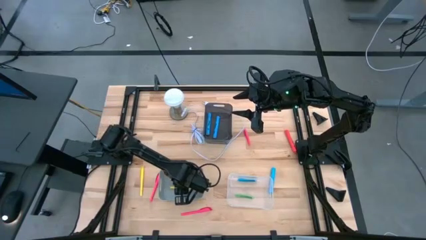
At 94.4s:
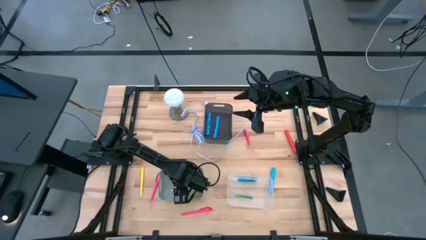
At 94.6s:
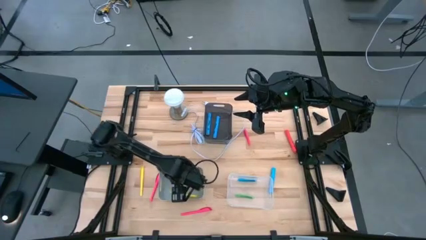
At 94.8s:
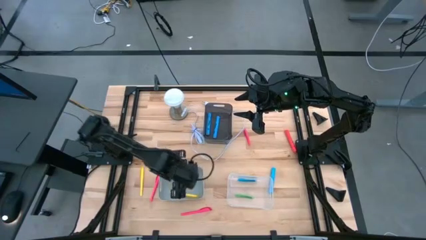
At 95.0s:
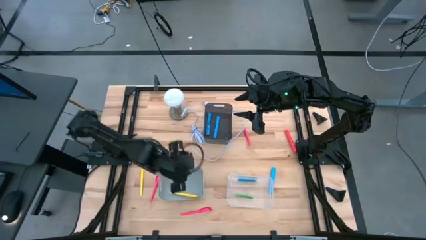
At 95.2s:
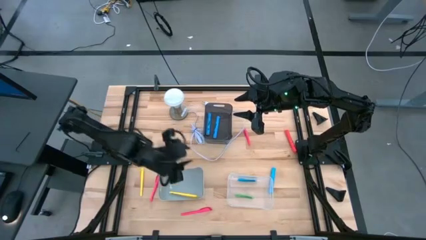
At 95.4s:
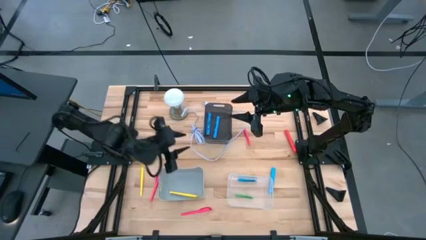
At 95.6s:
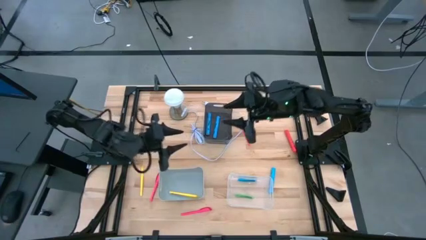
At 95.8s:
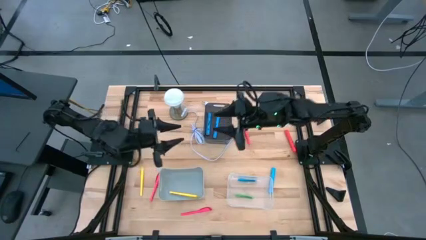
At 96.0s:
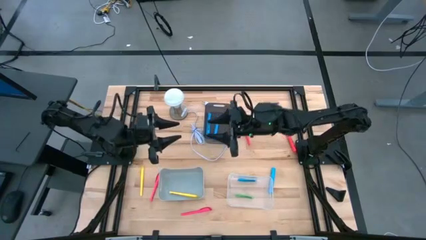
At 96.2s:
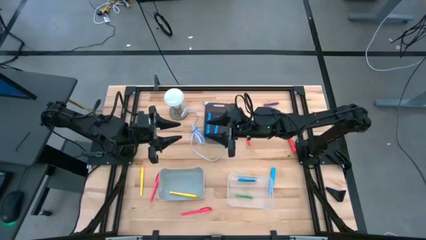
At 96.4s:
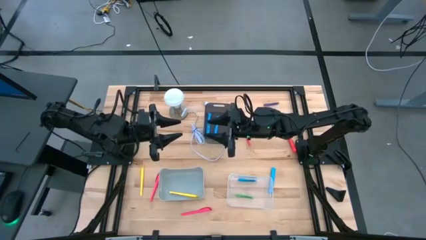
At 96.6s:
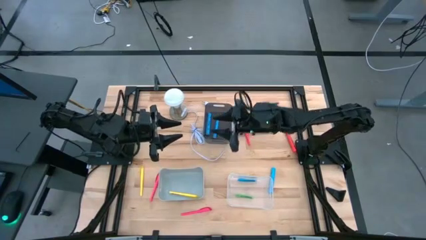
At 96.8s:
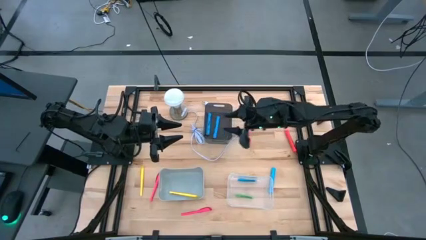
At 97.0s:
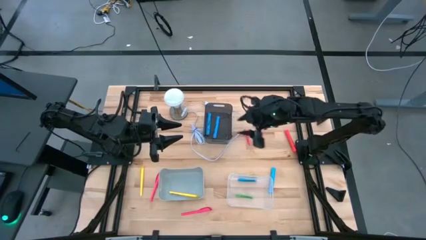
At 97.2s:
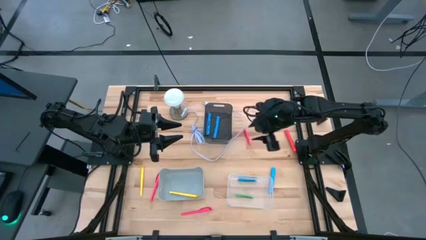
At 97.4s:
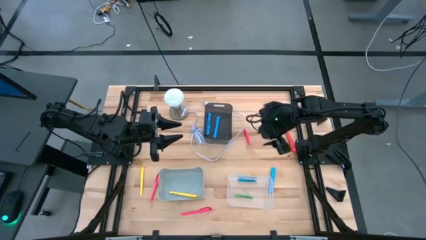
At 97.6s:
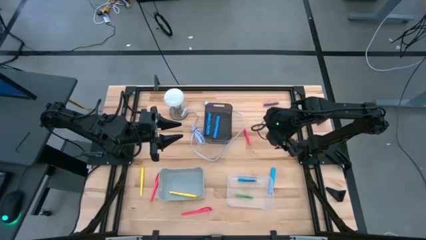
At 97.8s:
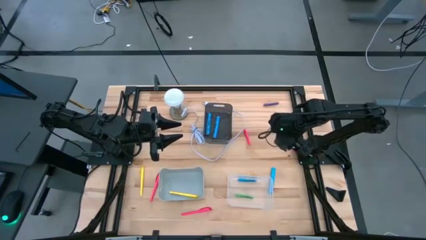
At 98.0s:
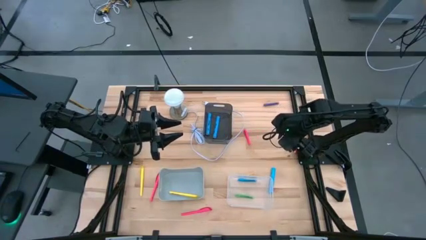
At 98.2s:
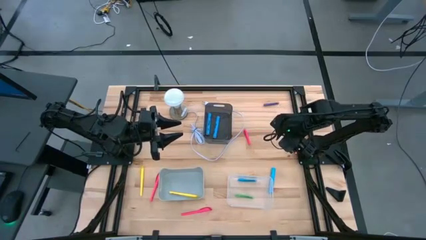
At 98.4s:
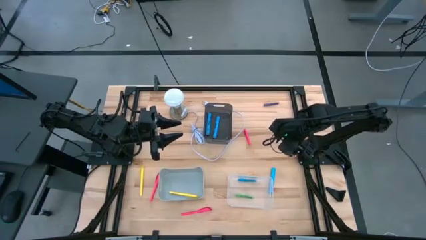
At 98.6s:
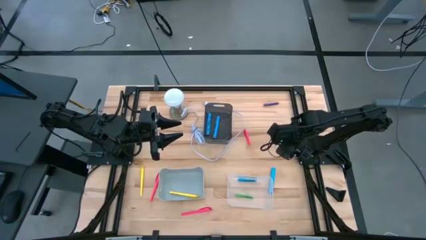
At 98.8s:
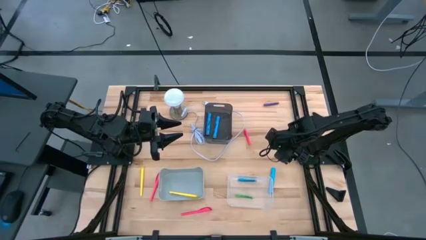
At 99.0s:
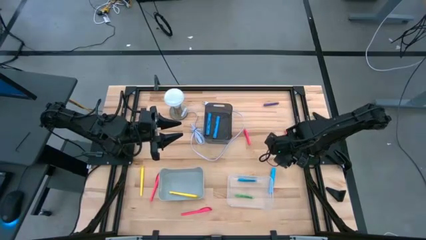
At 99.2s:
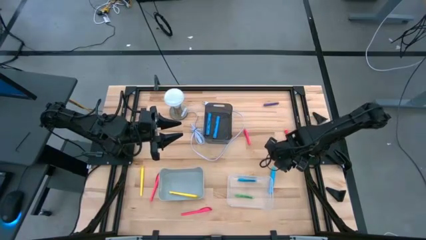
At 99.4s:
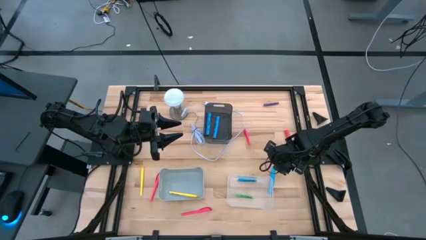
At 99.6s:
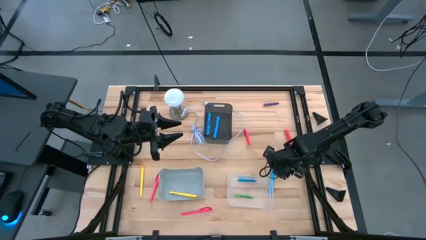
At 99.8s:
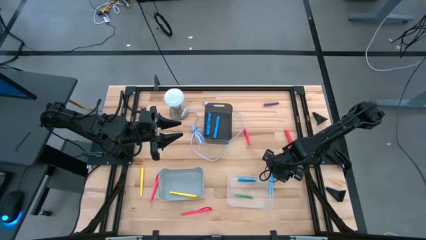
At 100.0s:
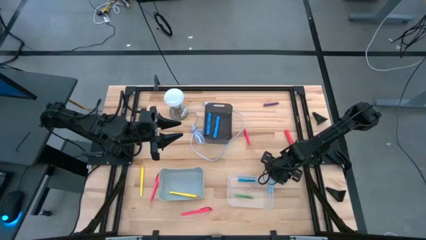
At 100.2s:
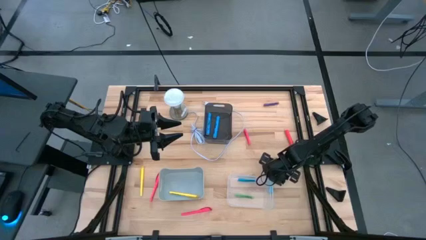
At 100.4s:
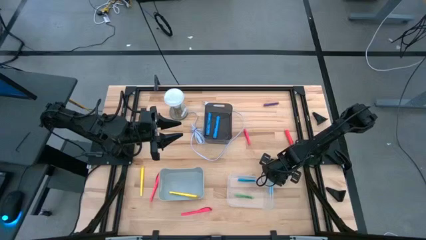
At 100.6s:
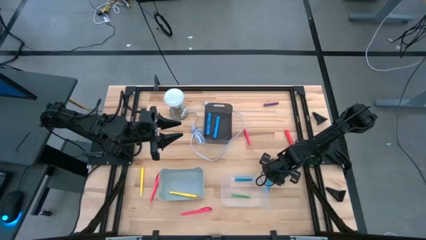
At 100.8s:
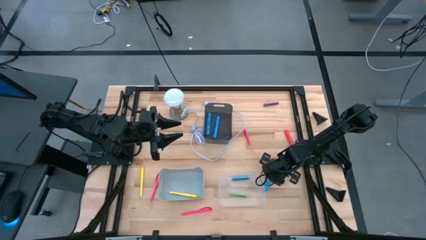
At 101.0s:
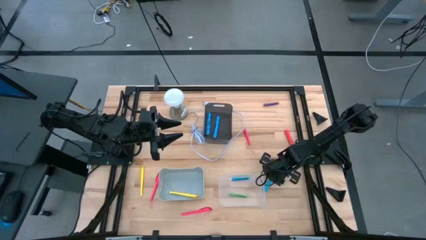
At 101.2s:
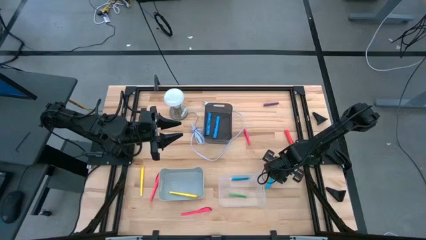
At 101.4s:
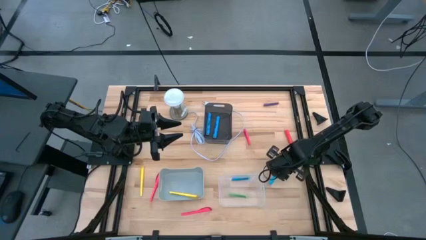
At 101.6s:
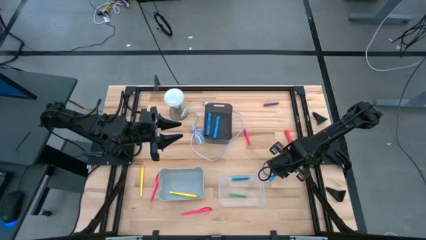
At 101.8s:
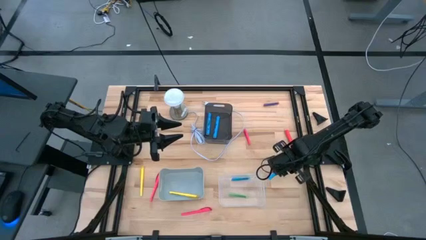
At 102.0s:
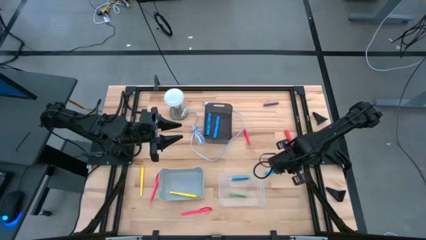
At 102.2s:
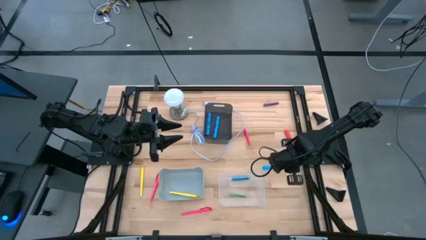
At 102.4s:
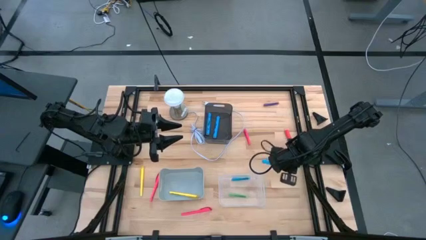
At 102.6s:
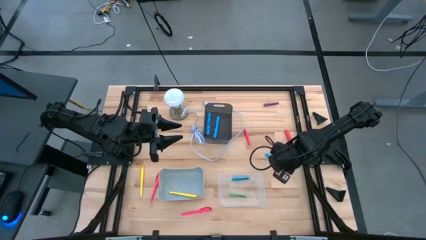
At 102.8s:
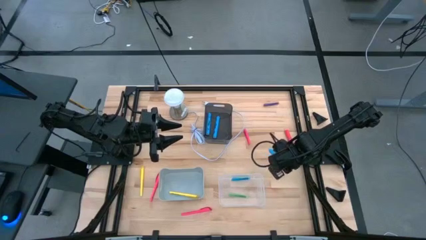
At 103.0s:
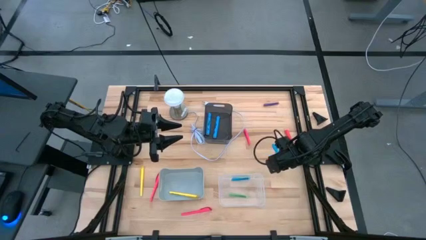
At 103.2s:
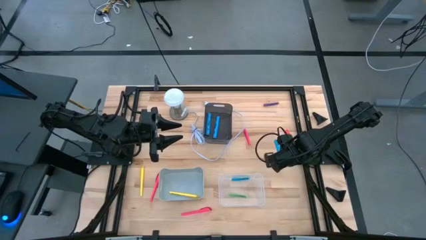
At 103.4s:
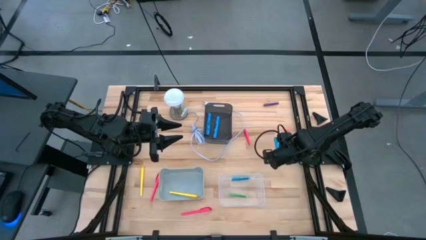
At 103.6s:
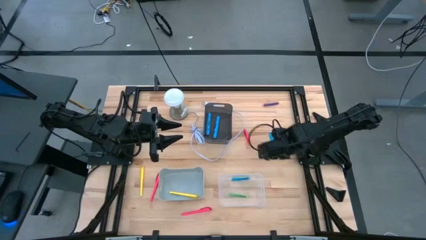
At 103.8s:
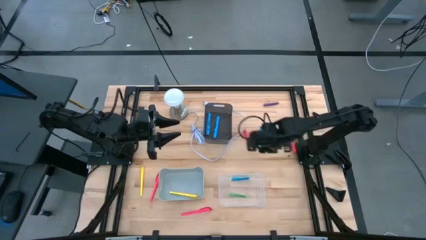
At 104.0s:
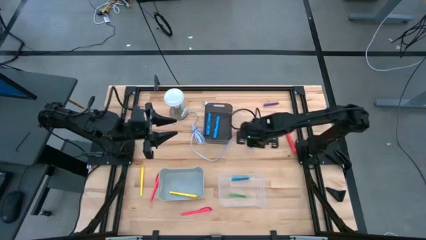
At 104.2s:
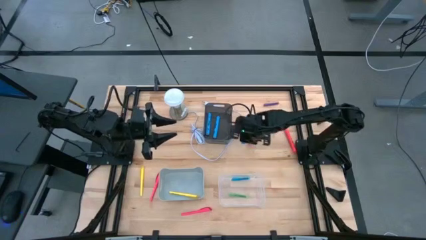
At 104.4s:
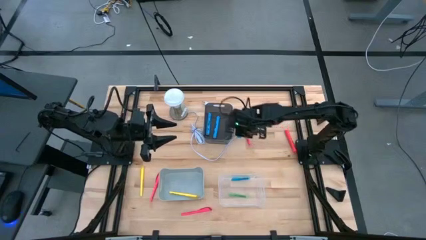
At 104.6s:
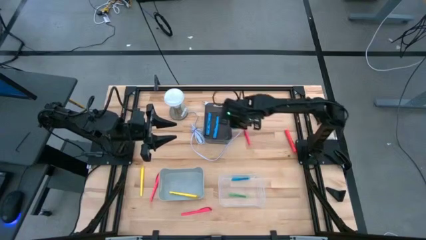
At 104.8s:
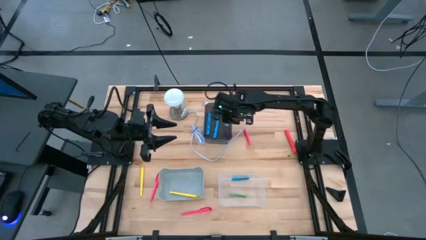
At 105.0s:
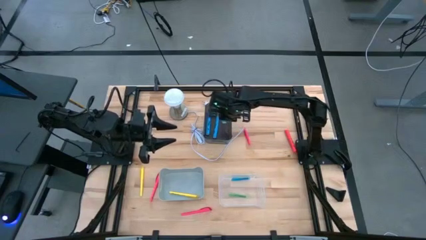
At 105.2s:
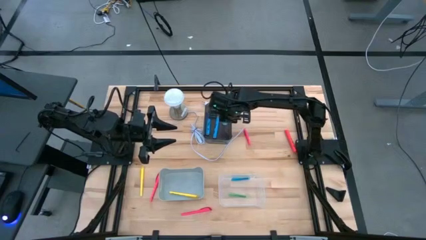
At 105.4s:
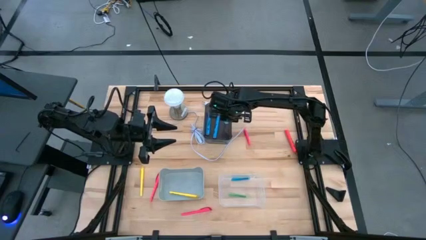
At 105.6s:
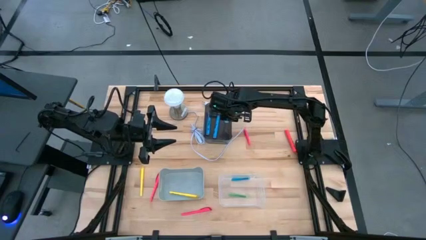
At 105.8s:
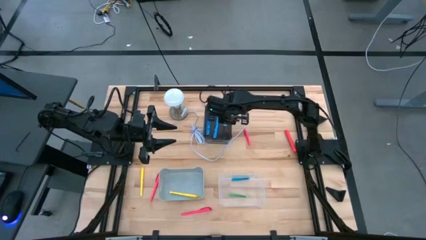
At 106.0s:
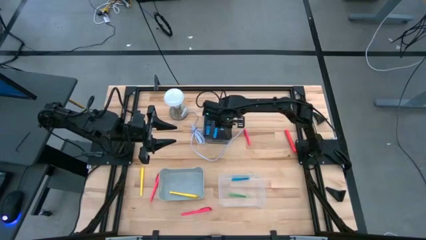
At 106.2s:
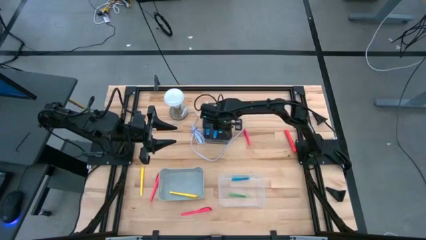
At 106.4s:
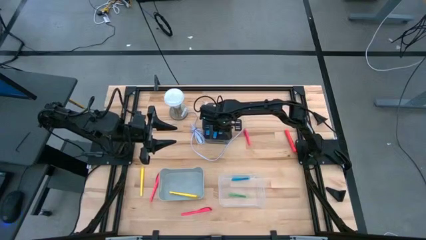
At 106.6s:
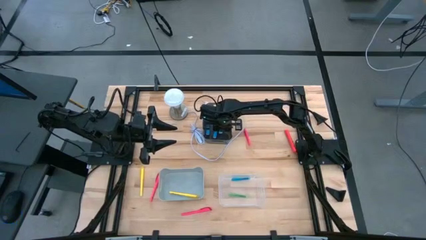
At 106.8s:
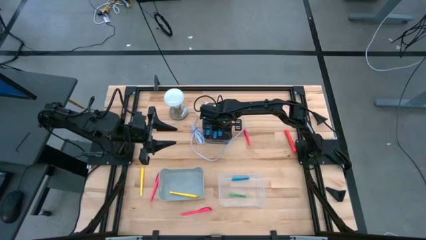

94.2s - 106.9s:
Task: Pick & Place Markers
Put the blue highlighter pen into the black bin

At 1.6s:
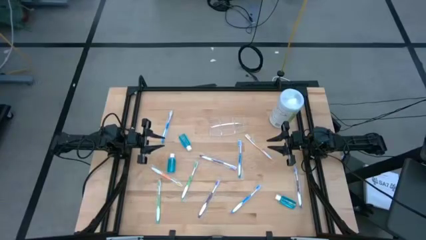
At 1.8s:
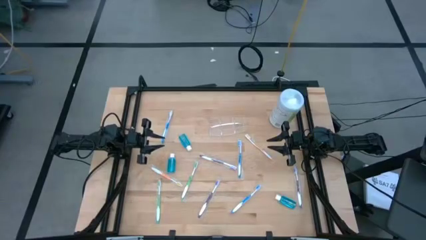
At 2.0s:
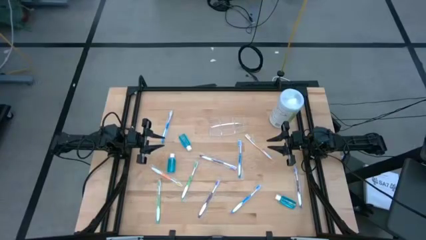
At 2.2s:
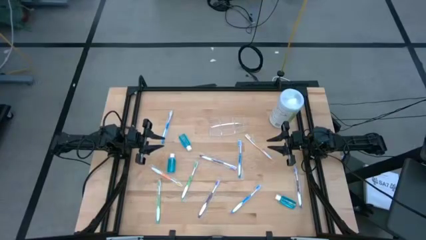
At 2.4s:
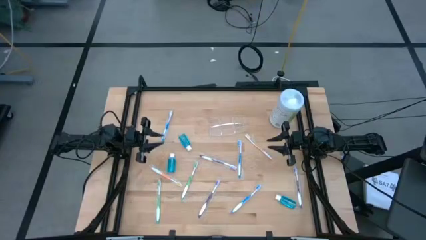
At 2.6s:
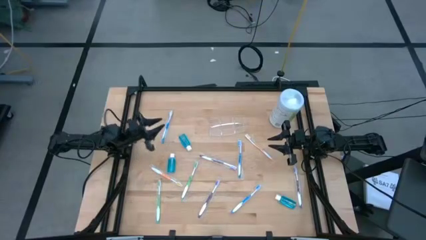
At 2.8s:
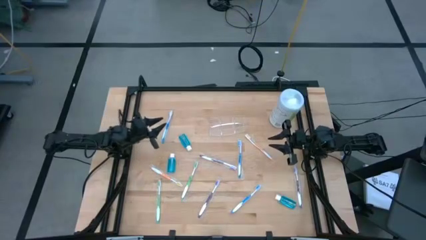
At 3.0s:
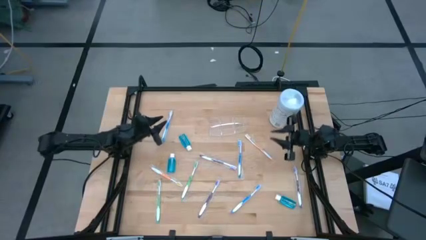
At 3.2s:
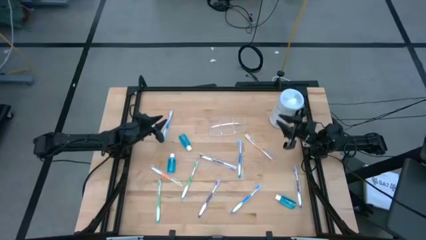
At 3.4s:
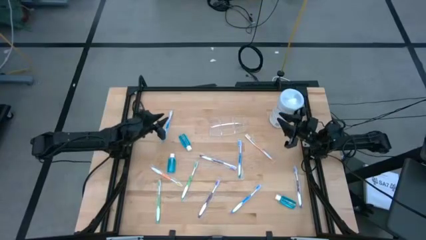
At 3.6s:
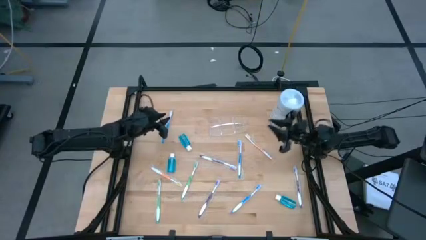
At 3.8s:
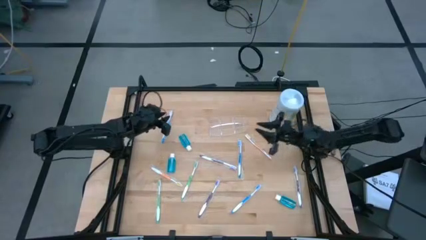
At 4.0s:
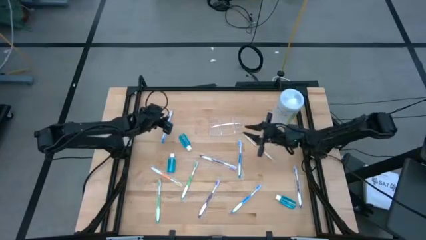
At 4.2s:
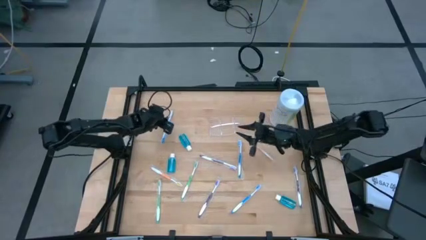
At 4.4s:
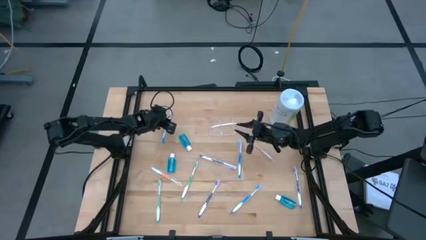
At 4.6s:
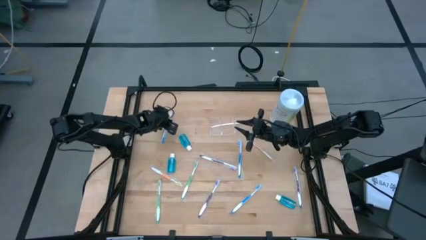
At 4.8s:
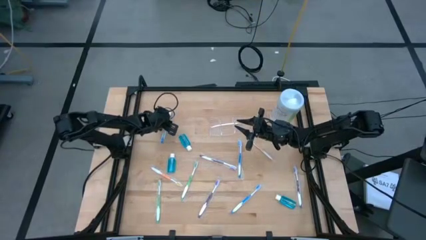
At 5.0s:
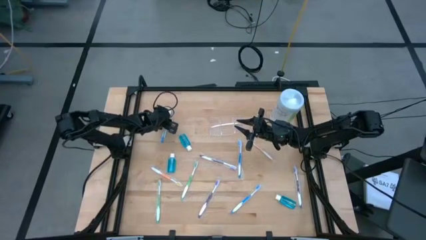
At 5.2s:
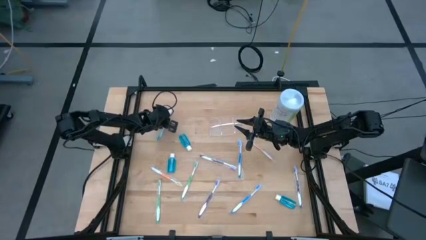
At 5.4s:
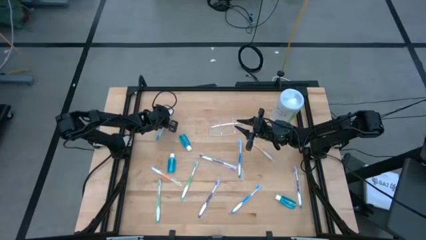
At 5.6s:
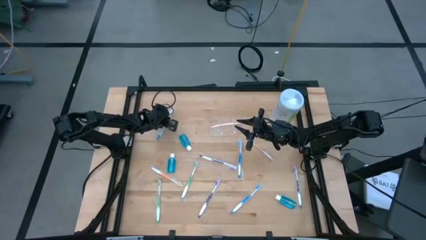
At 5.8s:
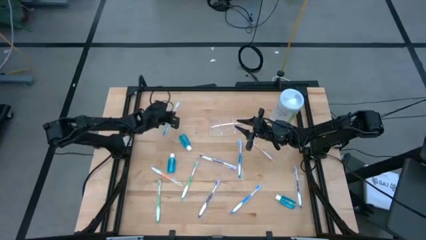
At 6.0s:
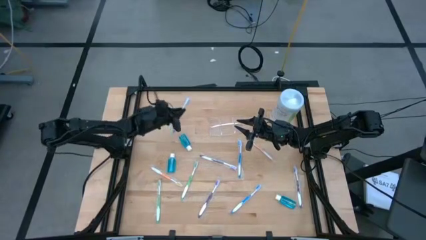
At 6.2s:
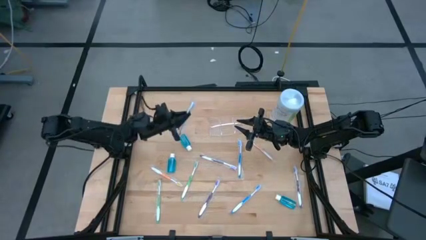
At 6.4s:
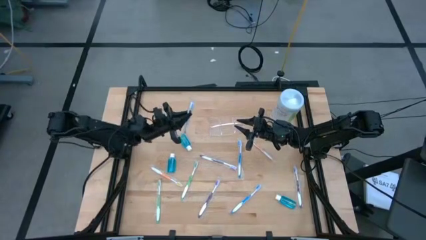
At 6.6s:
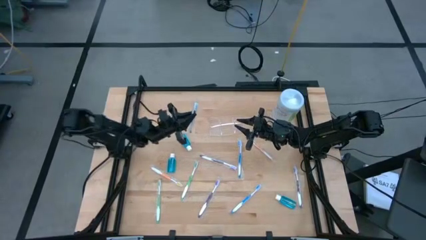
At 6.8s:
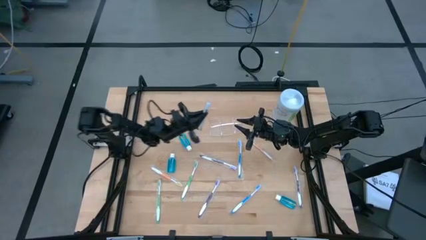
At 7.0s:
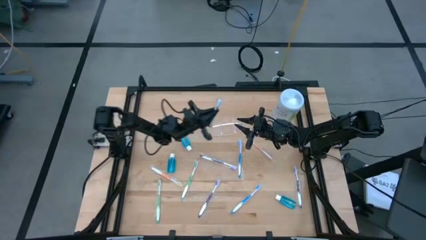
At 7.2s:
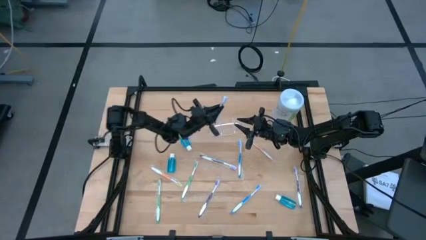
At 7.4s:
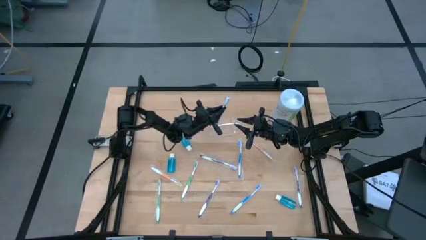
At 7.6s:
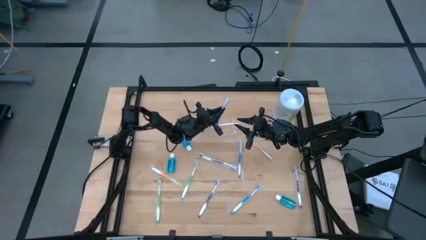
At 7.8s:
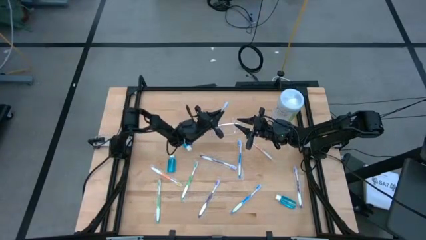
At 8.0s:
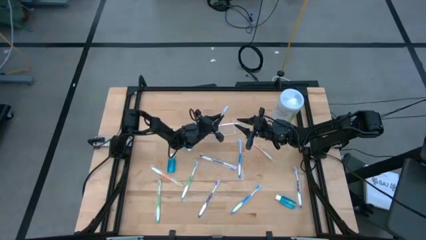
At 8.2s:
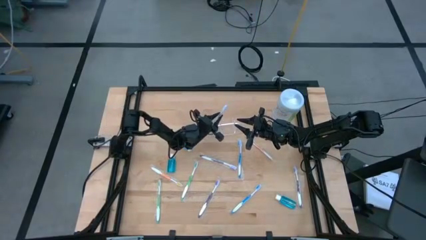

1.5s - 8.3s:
Task: Pick & Place toothbrushing station
Put the top blue toothbrush into the transparent organizer
